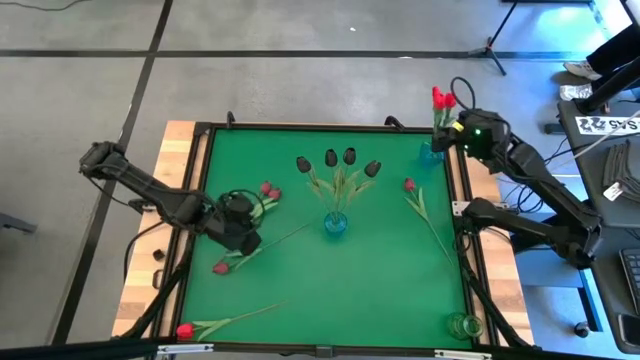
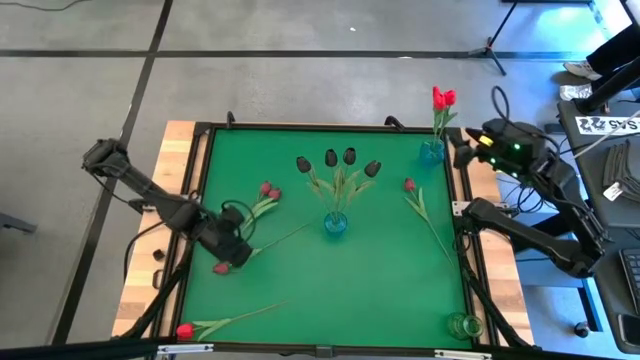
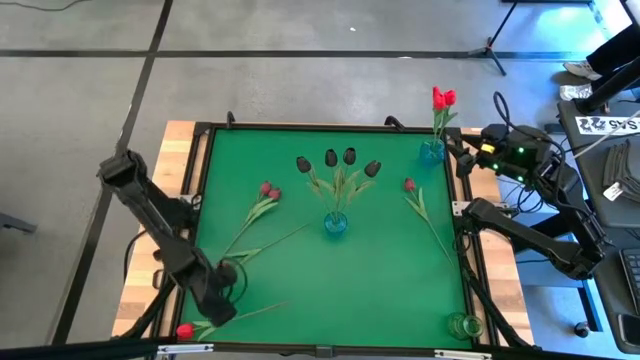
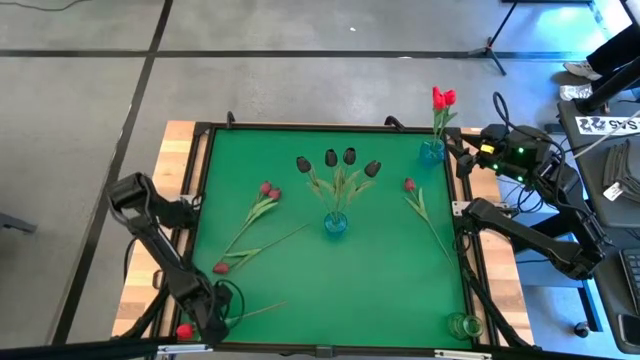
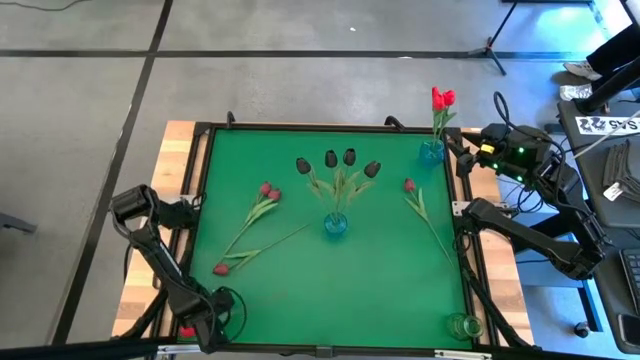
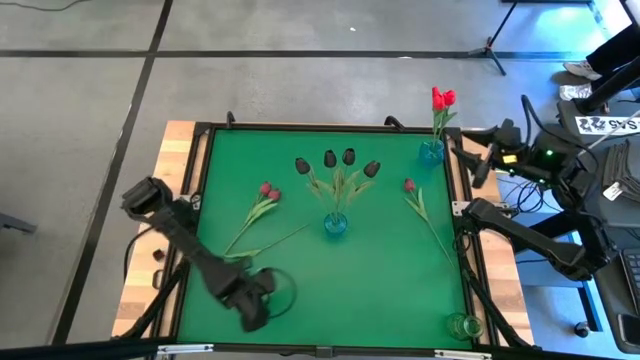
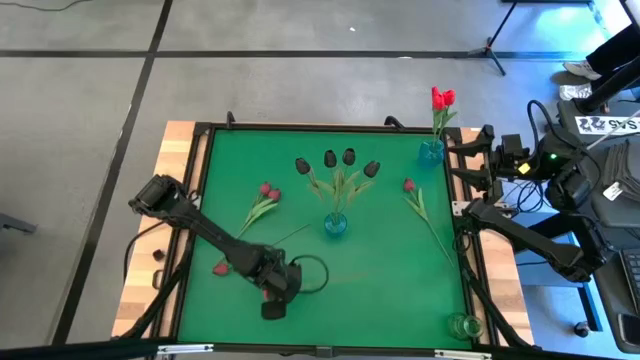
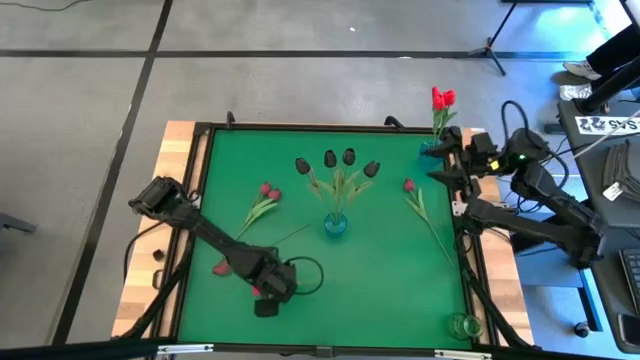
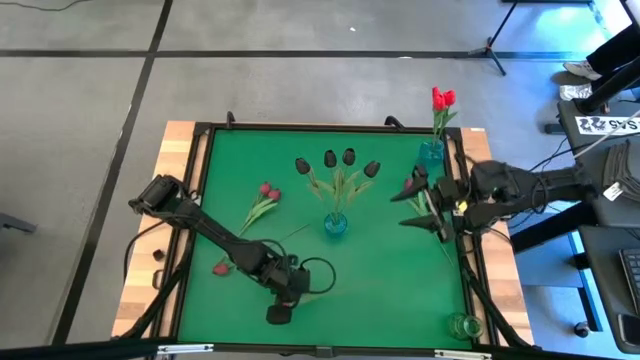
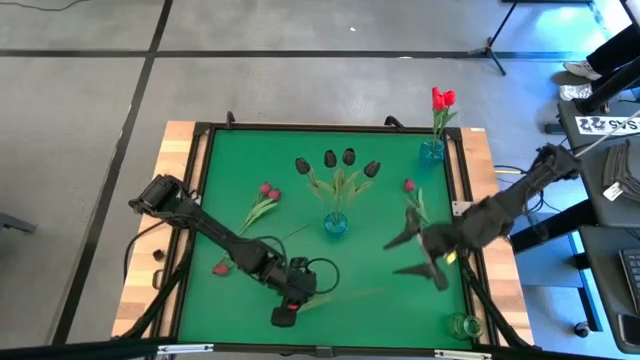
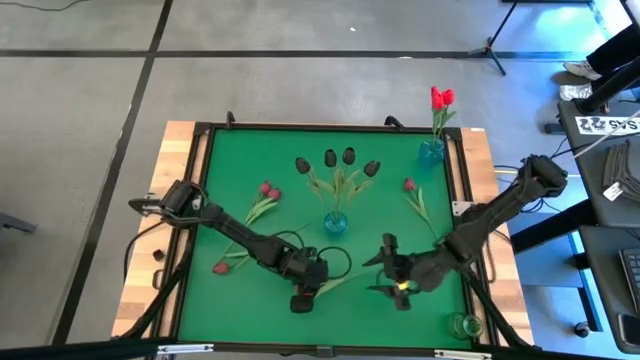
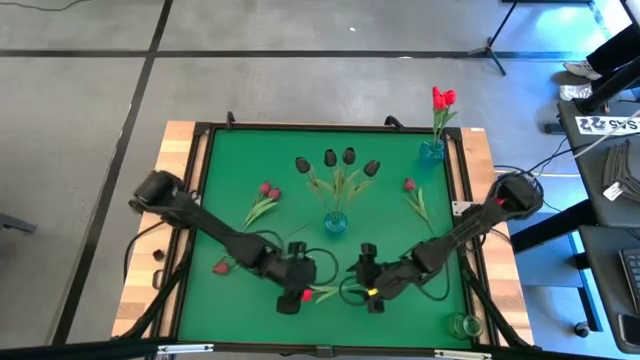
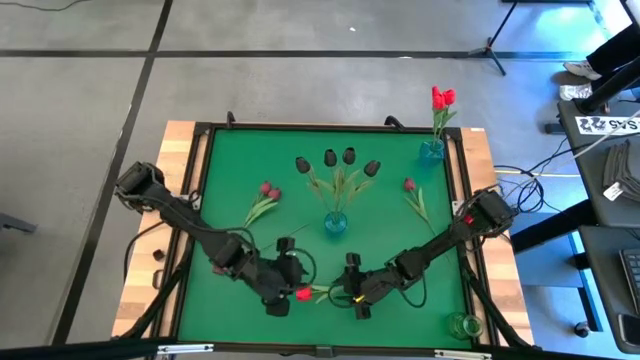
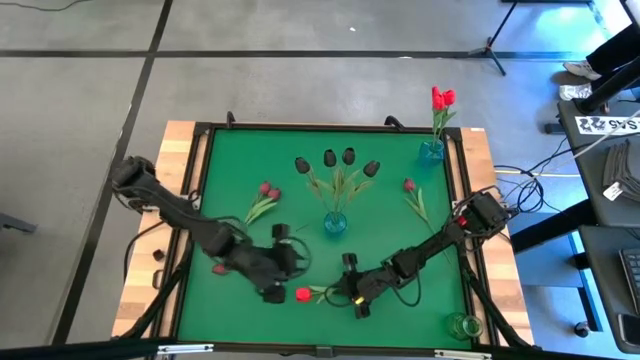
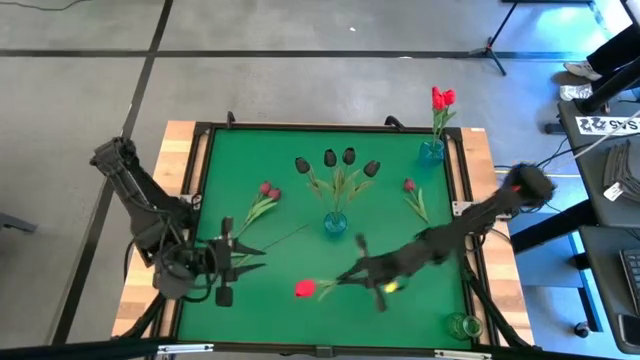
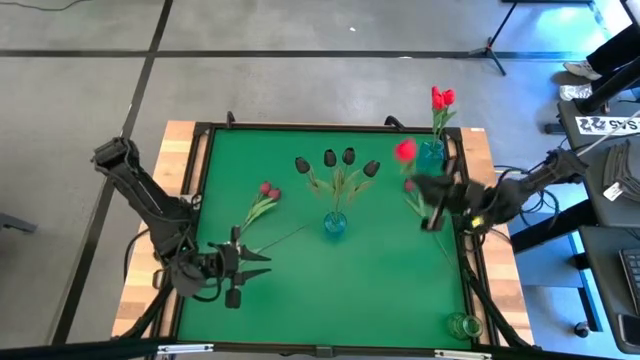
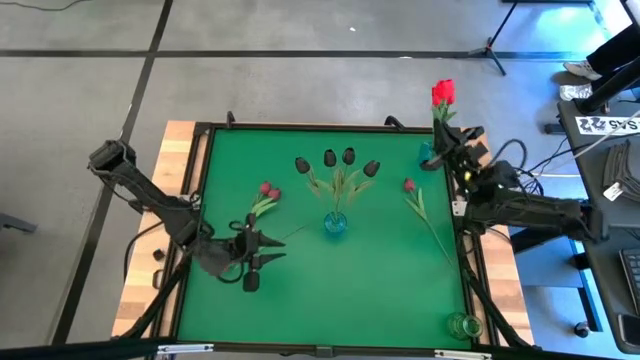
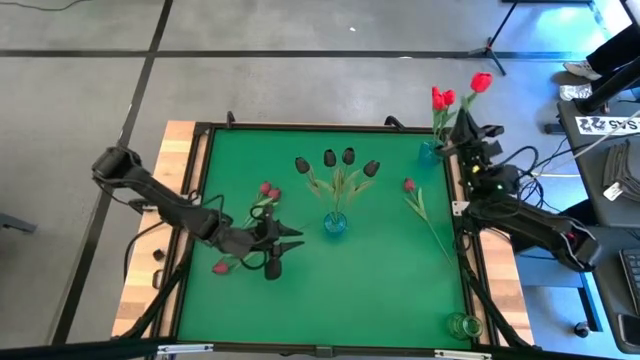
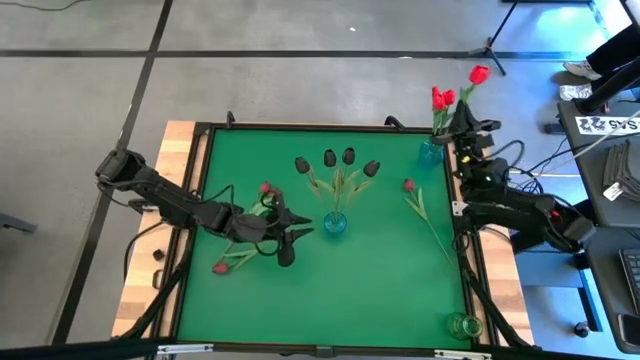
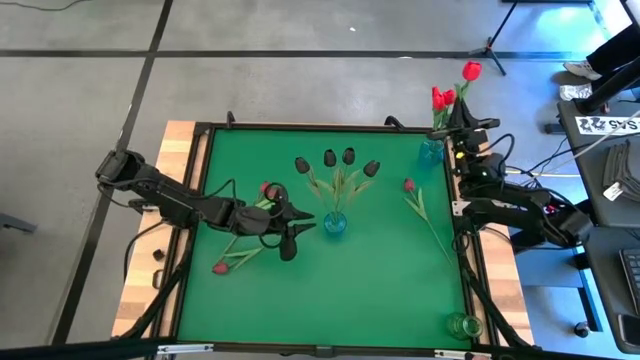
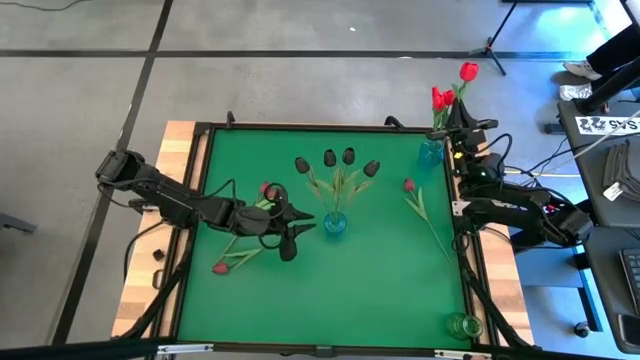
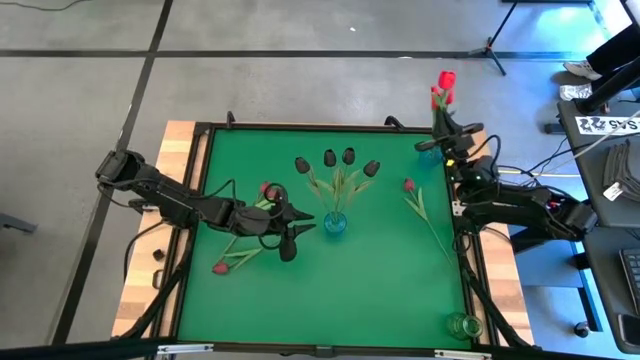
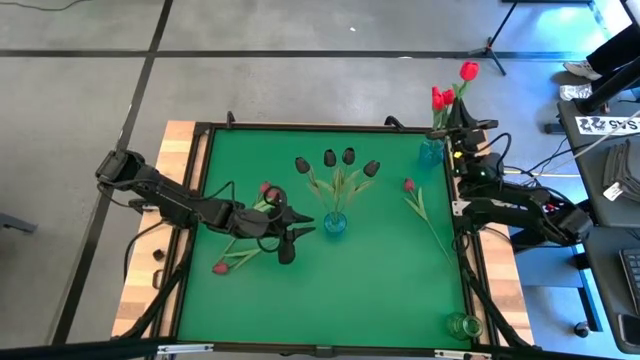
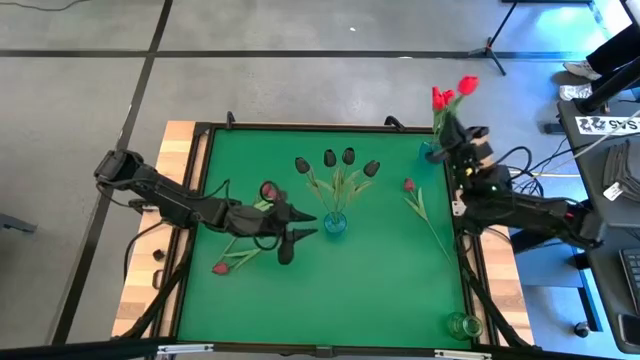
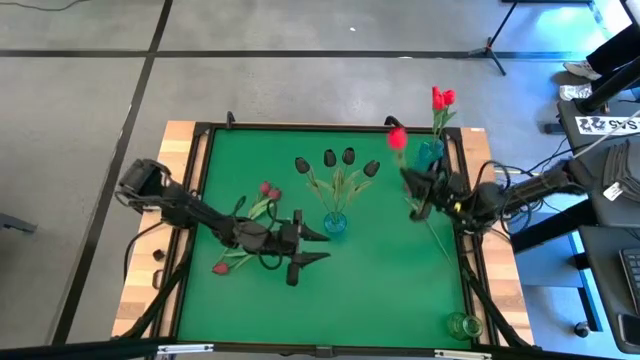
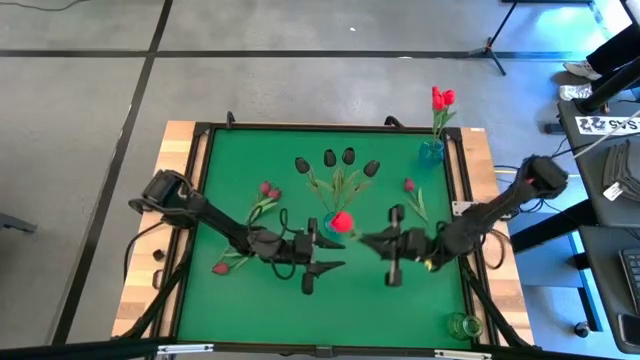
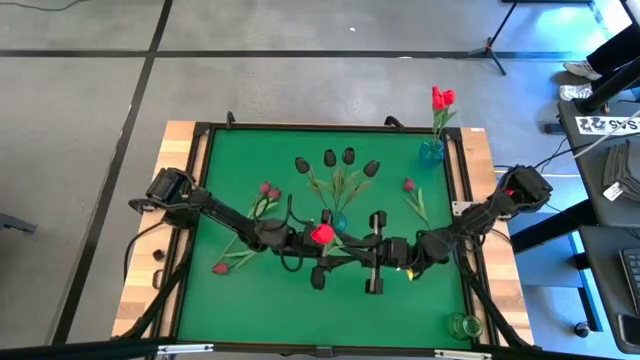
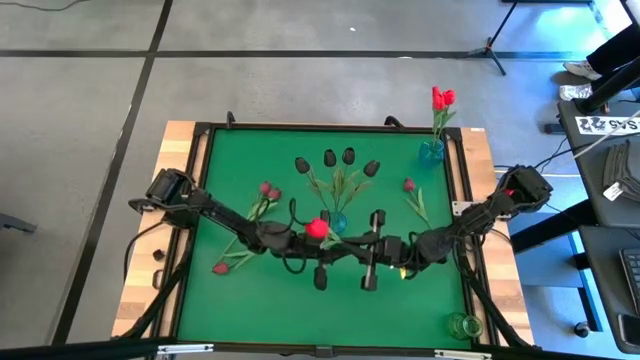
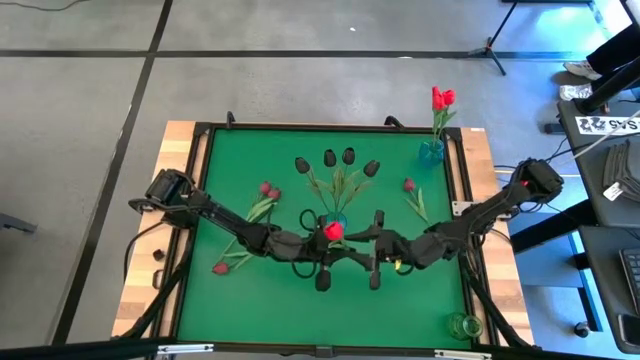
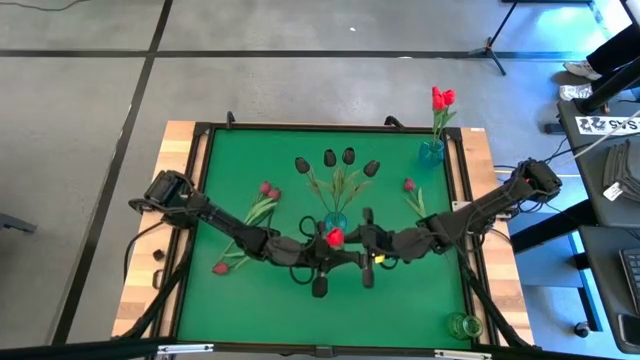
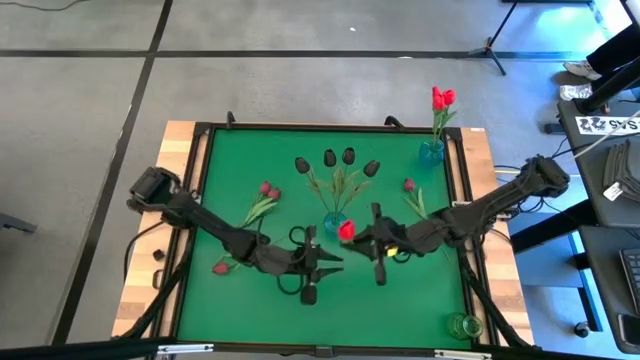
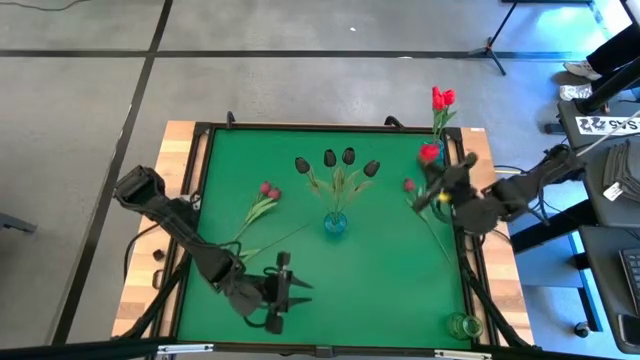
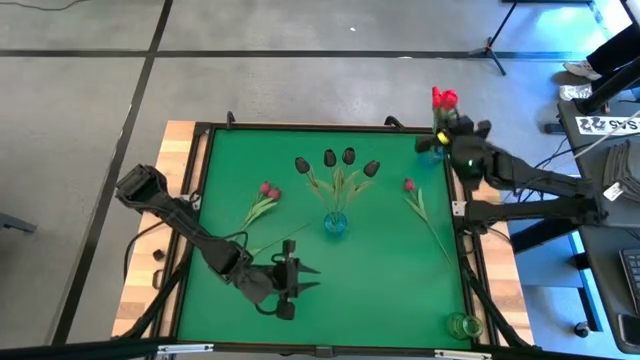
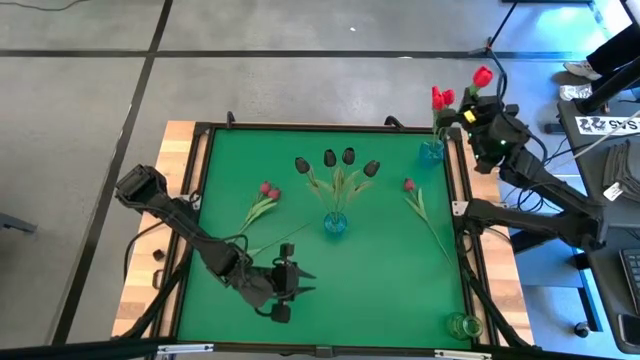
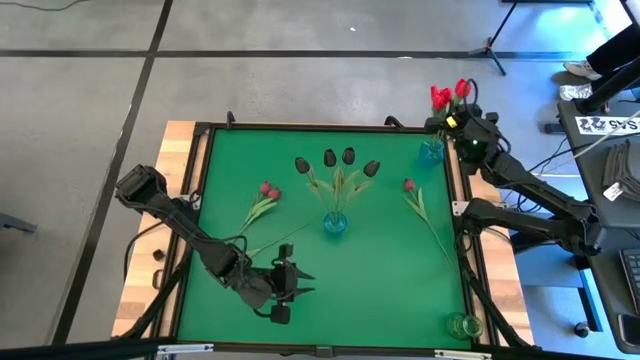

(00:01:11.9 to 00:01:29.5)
Task: Sort flowers into vase by color
Put the red tulip into the top blue vase
